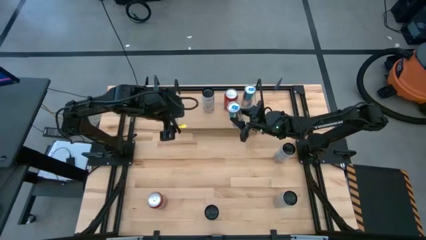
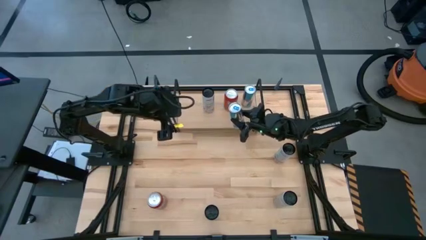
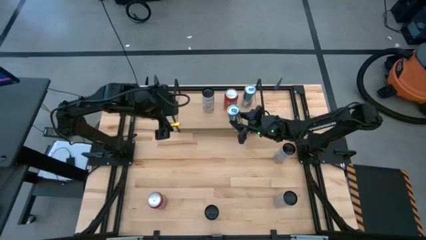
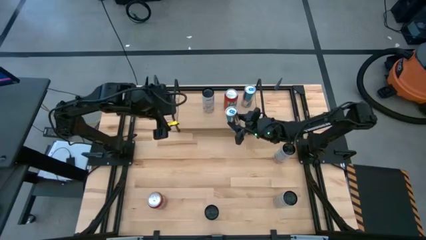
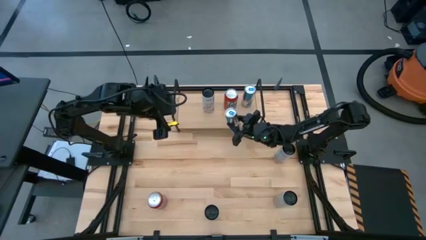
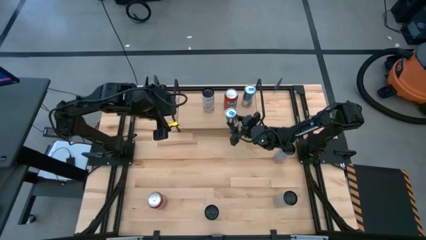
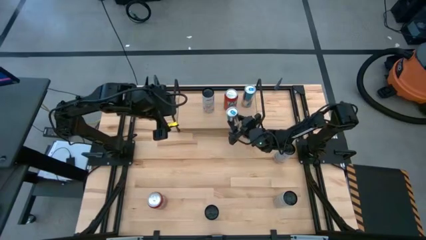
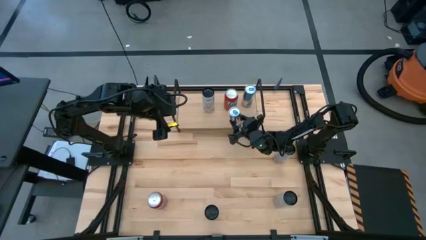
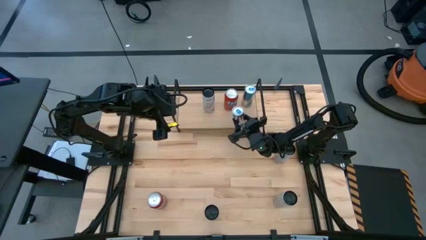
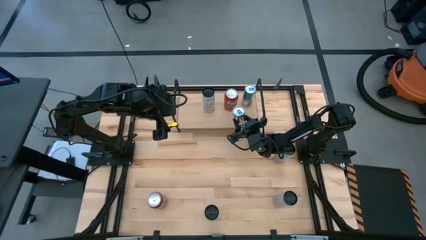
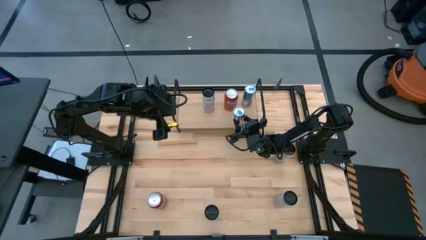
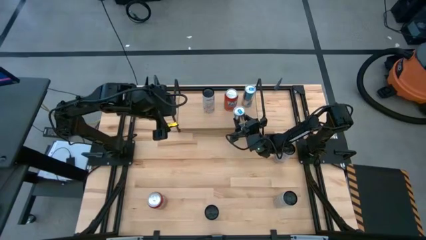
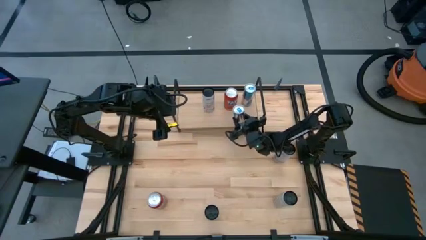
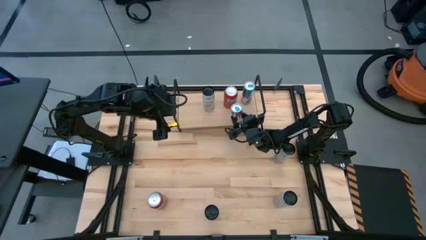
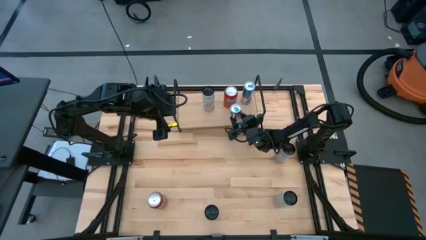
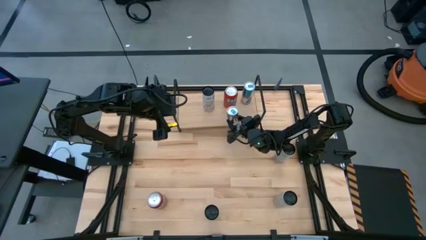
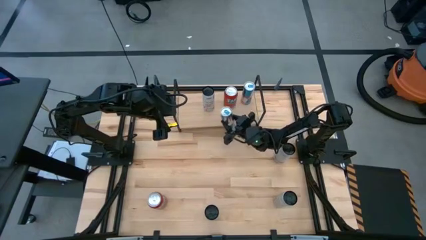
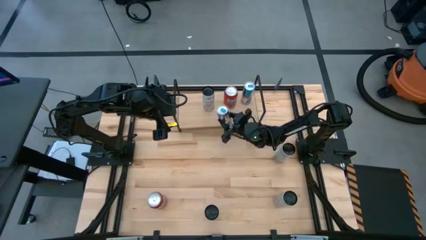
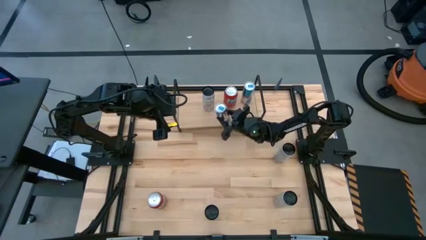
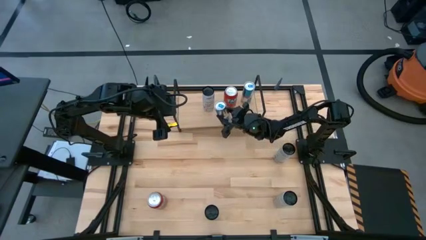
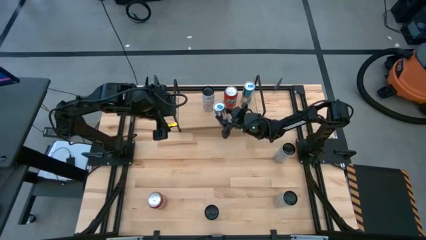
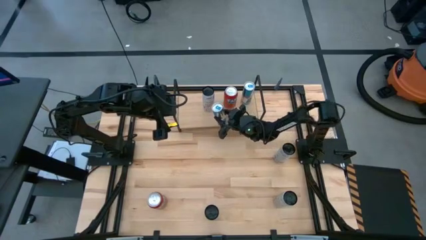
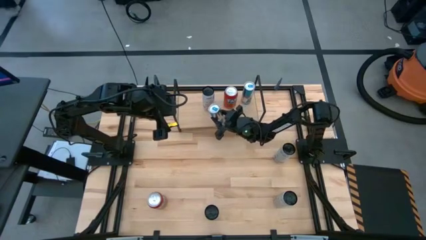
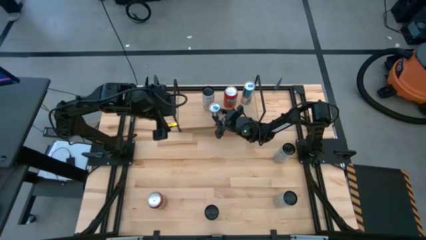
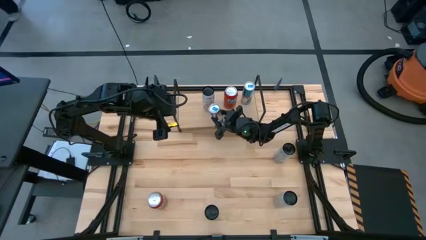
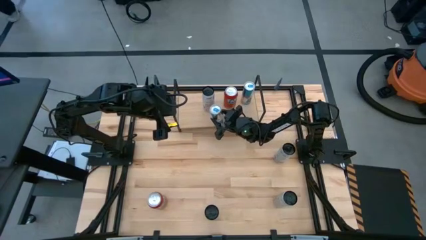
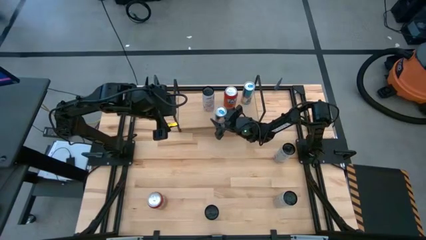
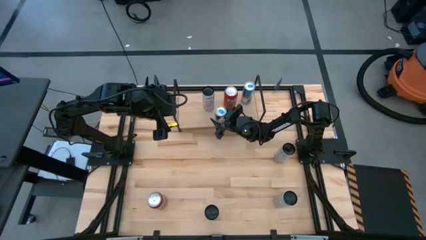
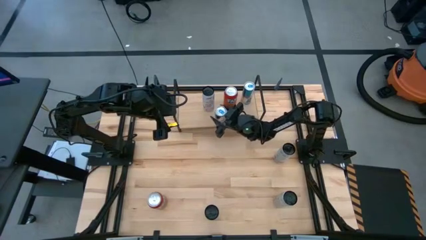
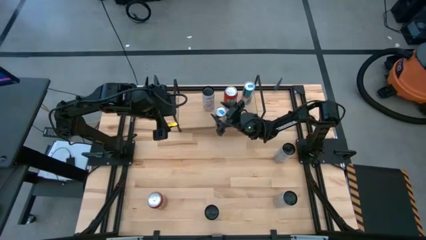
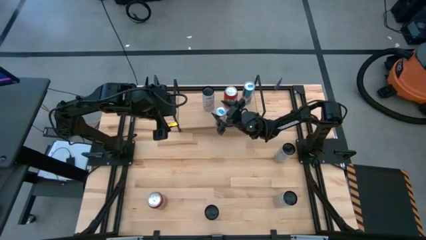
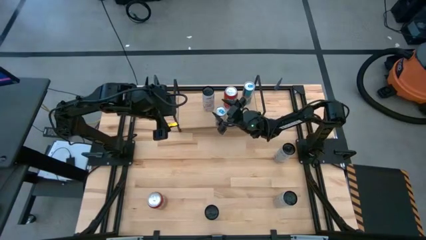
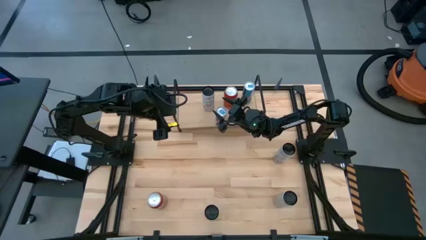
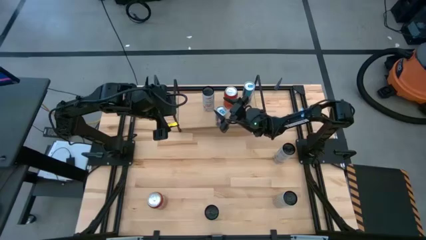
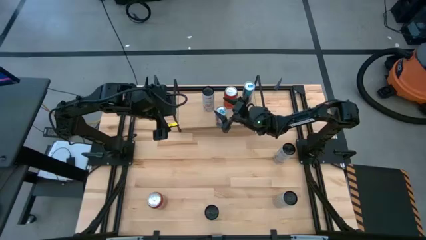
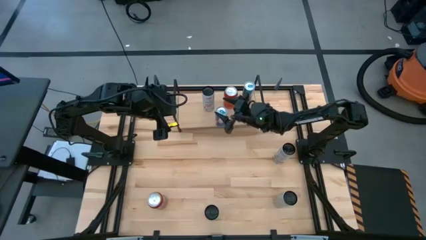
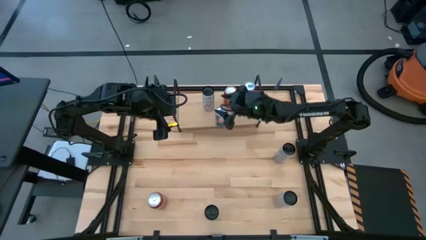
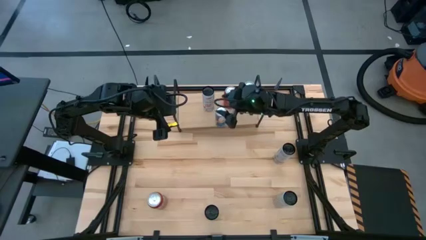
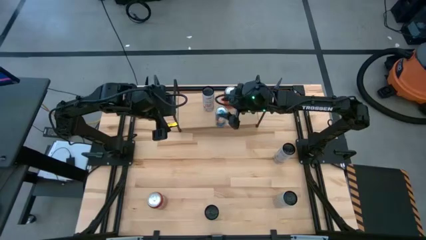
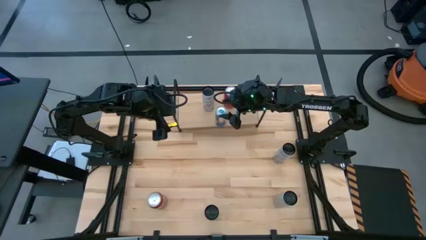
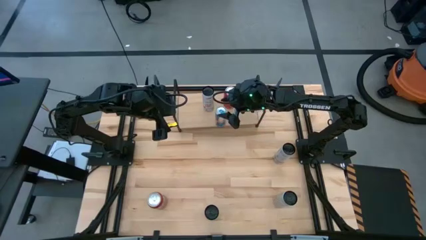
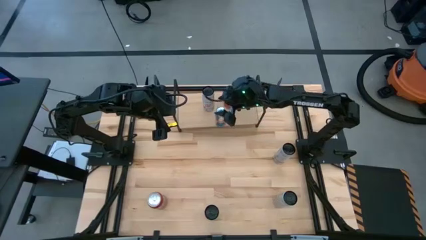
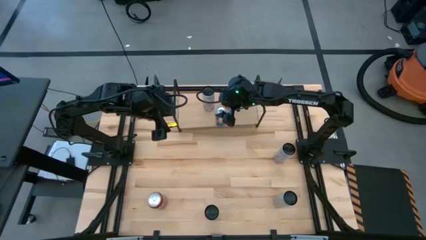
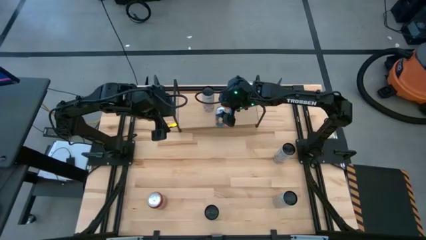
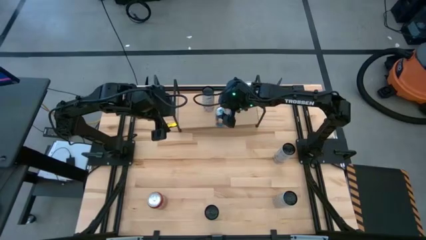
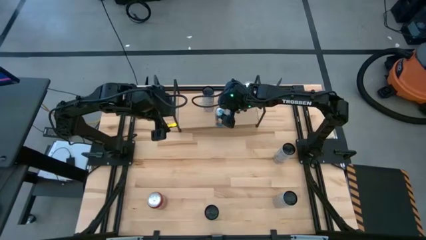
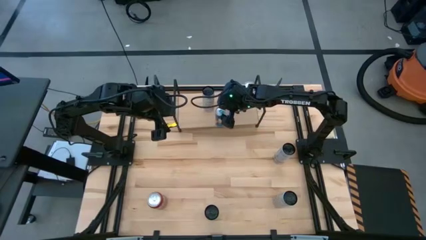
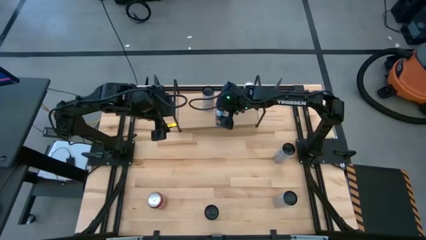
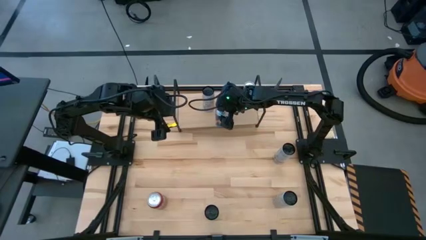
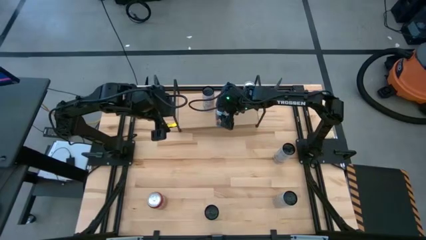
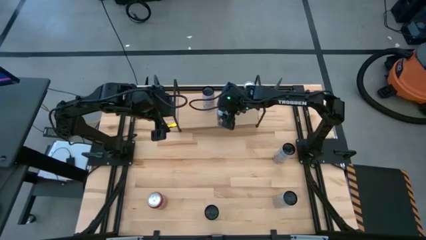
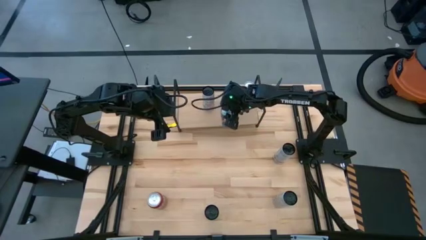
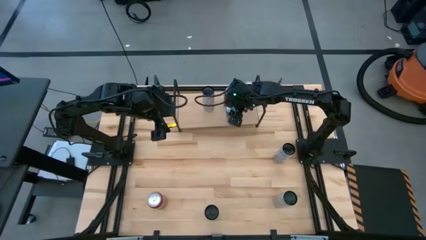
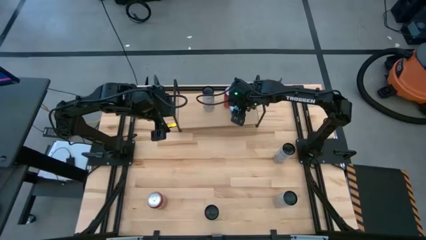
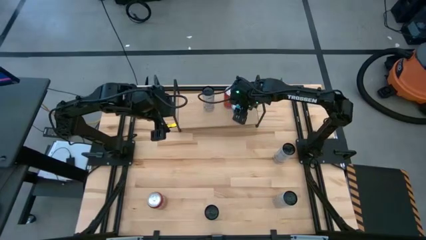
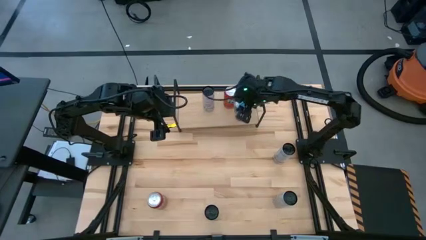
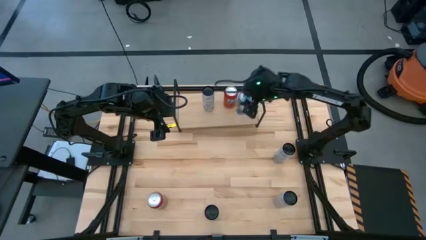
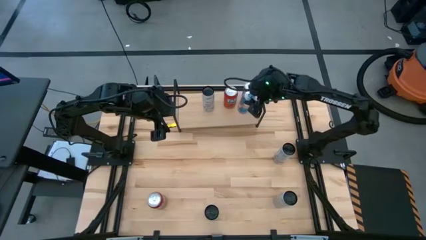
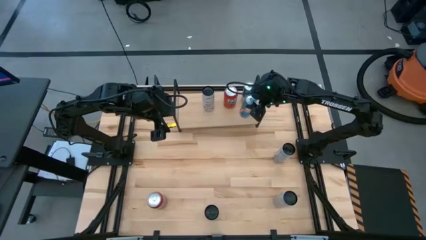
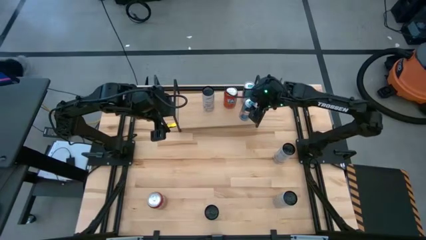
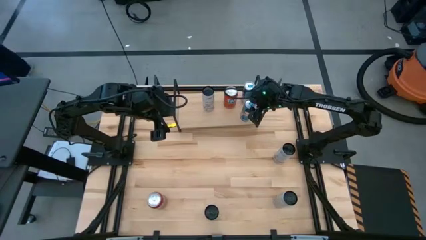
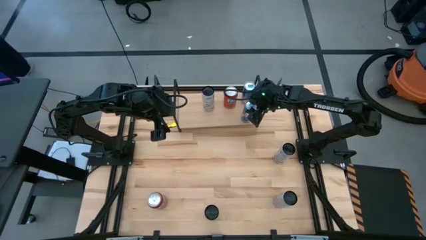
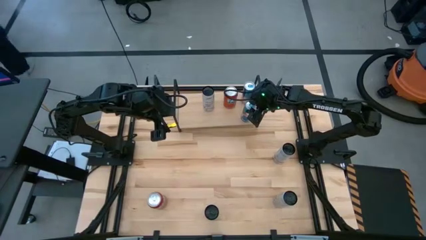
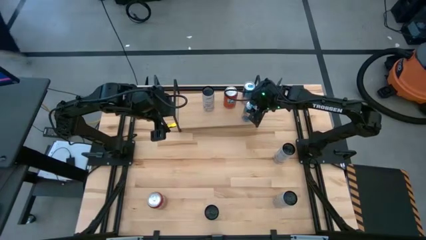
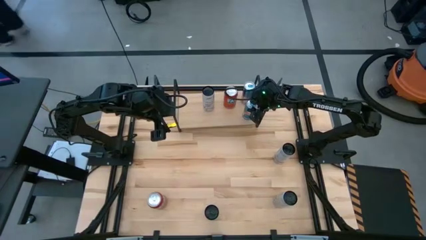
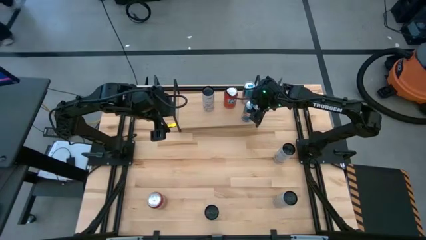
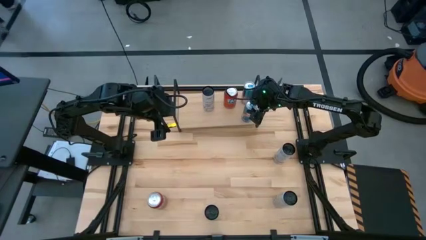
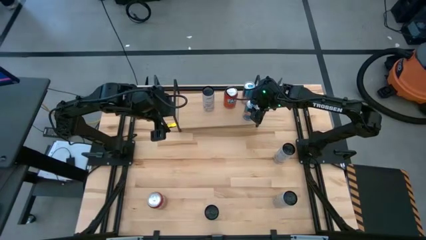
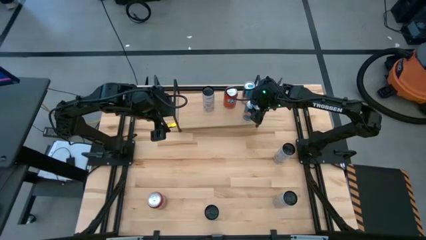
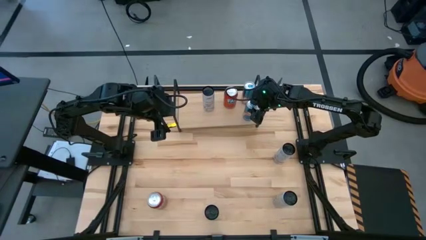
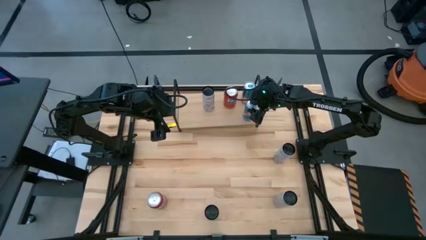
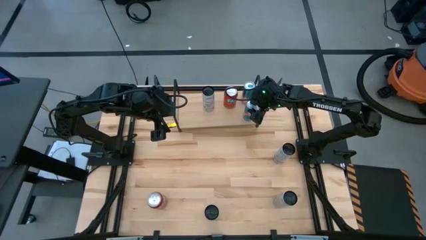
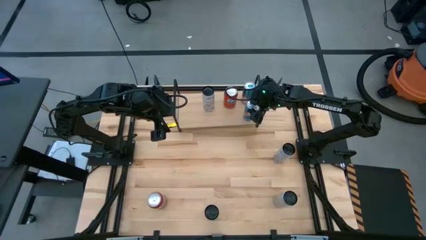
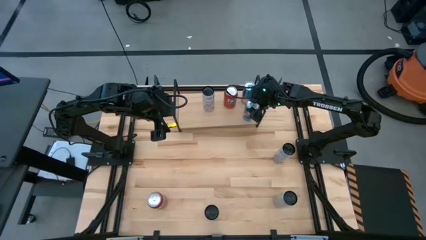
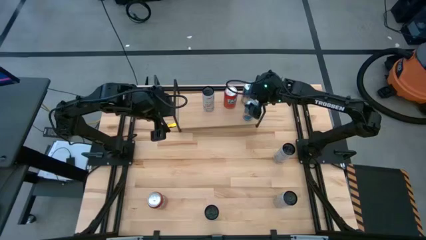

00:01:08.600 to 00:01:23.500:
Task: Place canned beverage on shelf
Put the blue soda can aligned with the other blue soda can on the shelf
